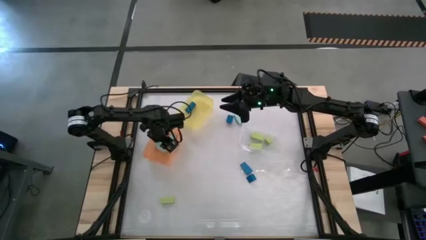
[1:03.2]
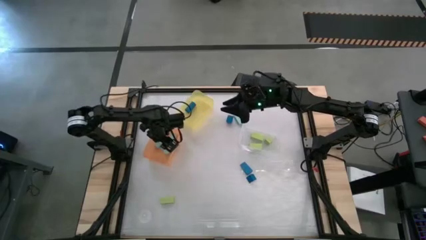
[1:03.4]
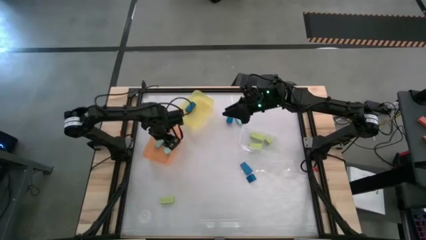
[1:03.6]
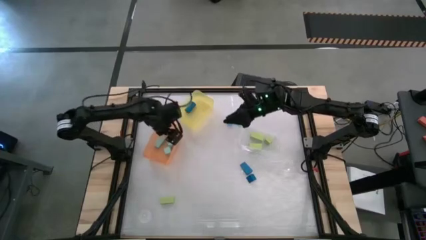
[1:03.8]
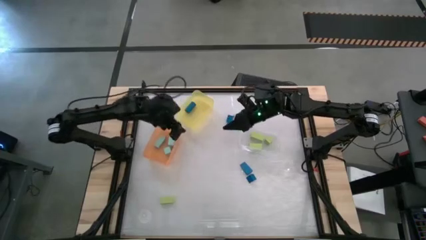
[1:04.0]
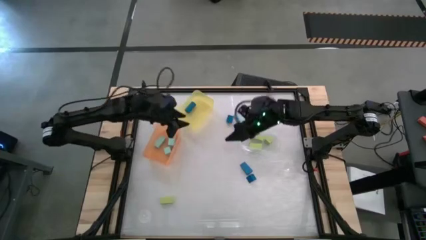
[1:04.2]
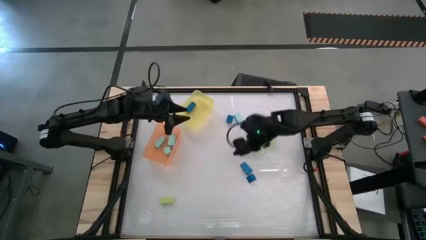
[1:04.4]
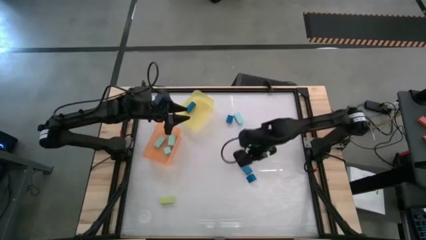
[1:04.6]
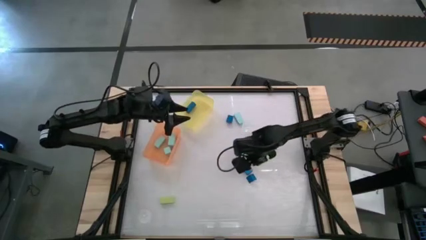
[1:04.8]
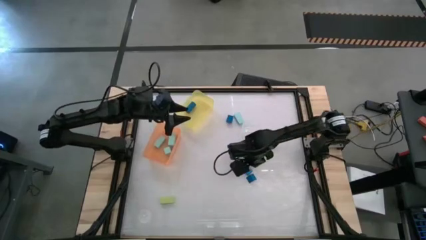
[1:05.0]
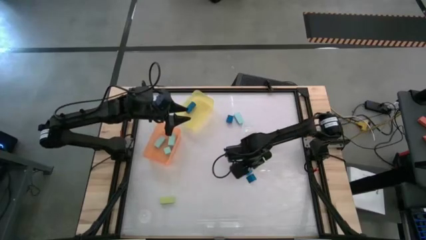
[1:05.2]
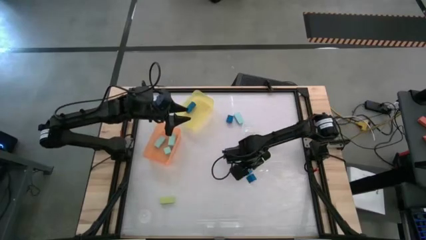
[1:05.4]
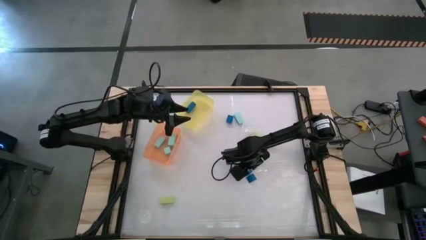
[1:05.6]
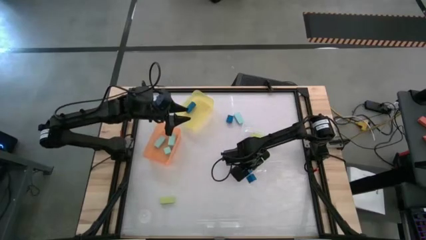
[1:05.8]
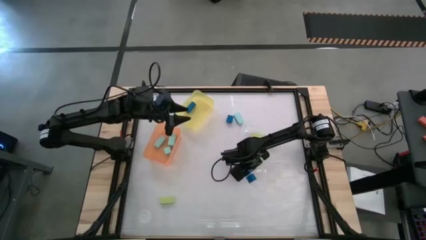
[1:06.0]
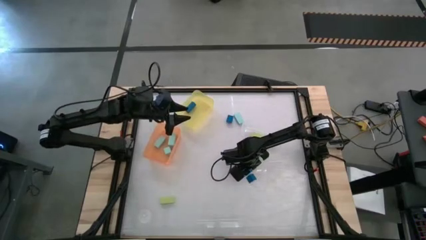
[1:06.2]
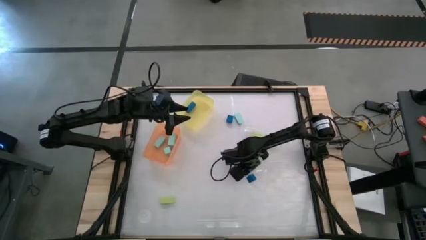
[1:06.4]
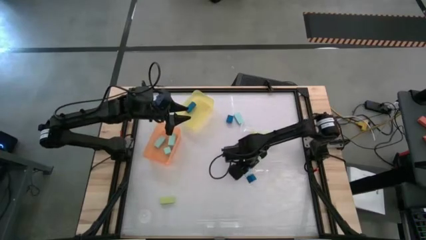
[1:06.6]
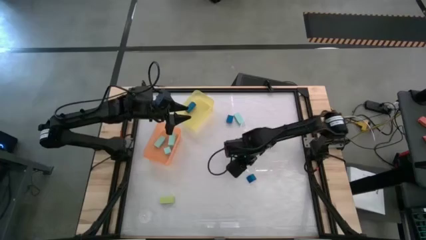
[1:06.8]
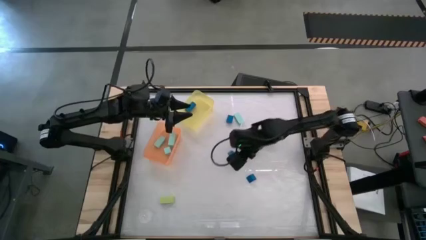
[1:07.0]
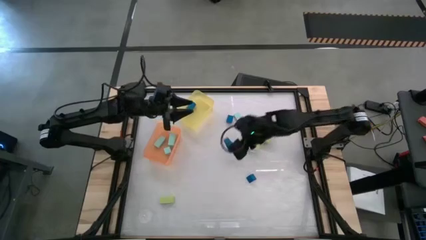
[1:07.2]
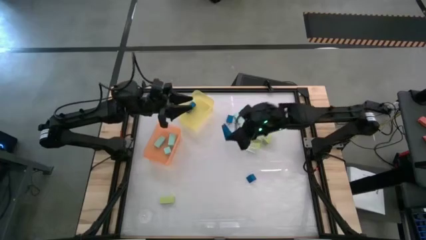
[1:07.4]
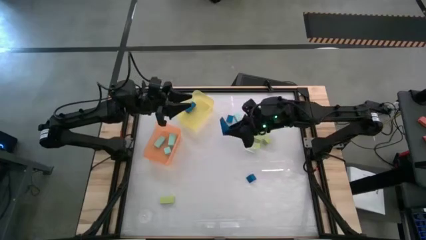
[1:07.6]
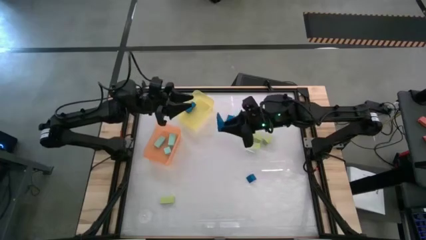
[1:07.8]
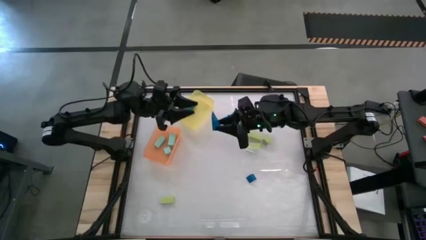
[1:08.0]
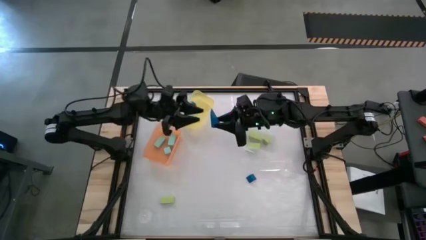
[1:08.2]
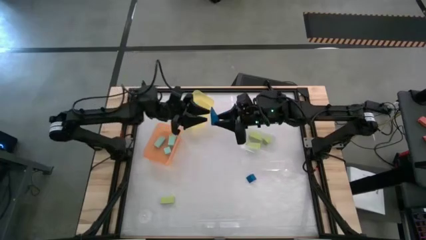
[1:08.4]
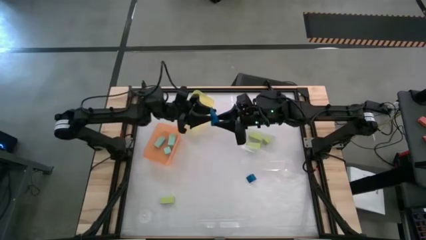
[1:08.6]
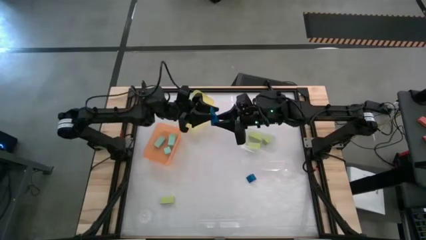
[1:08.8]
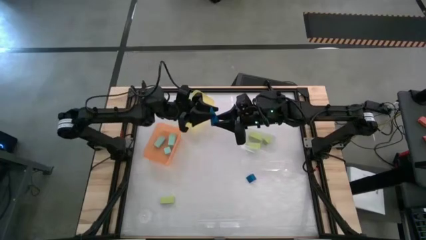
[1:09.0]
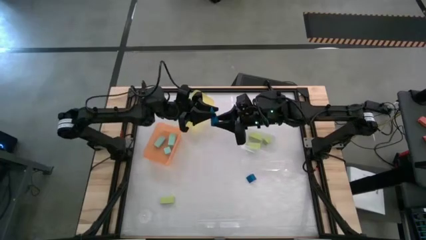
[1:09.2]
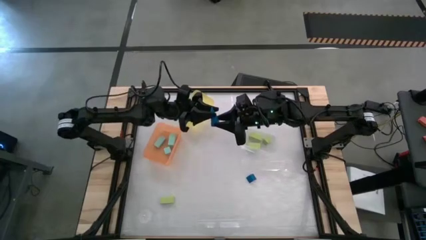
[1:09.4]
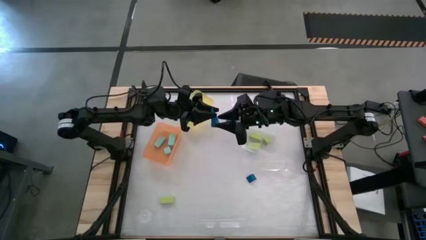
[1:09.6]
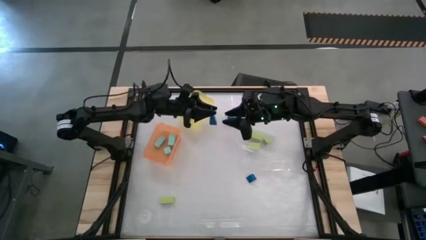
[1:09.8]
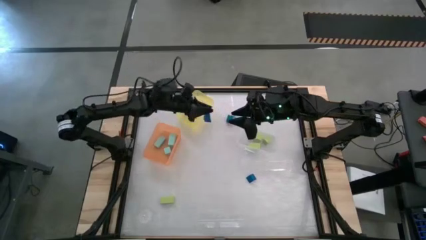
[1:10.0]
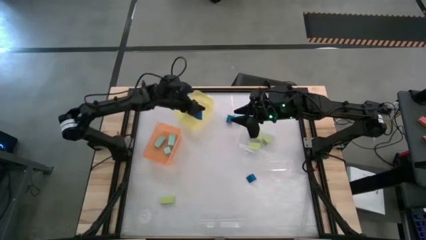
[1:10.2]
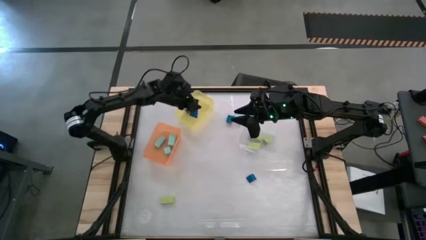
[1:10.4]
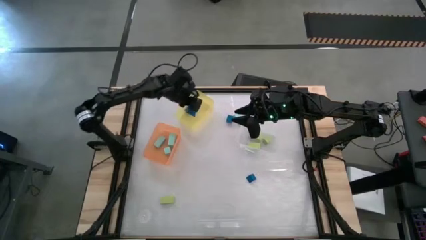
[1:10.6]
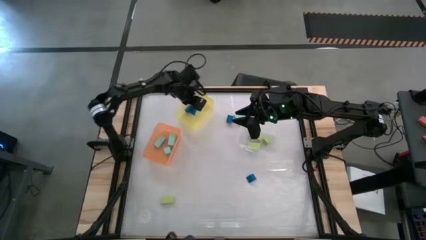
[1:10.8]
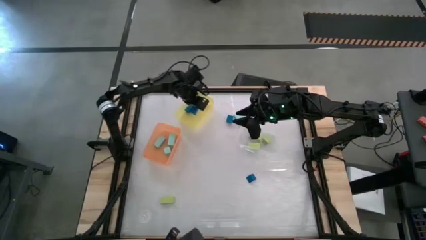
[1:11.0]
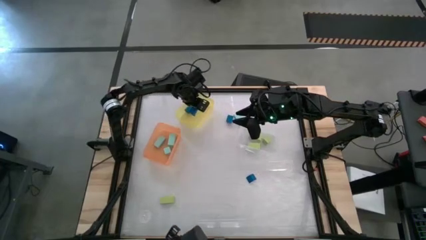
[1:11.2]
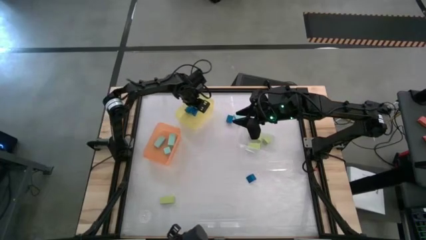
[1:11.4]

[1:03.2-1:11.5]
Task: Sort & place blocks by color
Put the blue block into the yellow bin

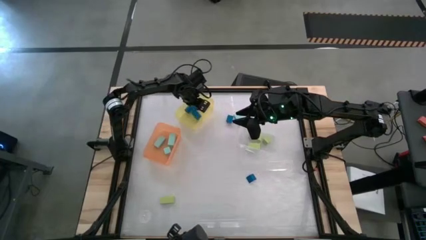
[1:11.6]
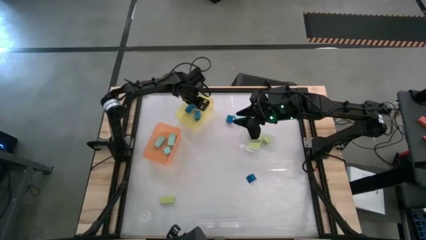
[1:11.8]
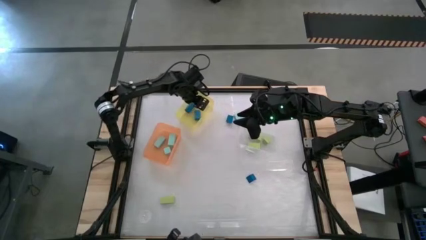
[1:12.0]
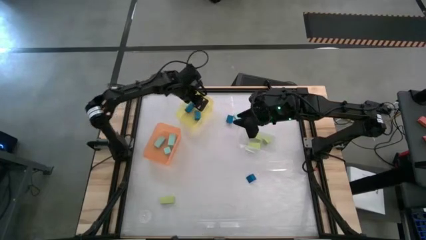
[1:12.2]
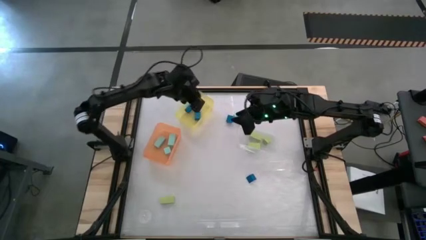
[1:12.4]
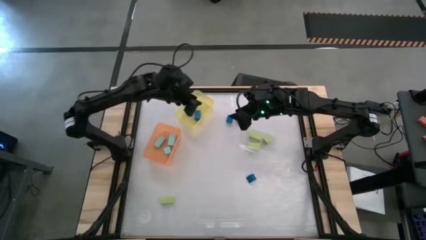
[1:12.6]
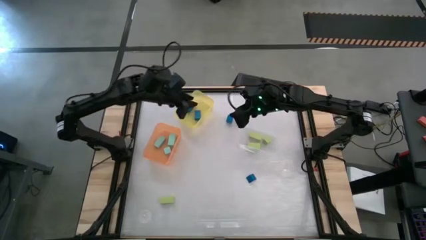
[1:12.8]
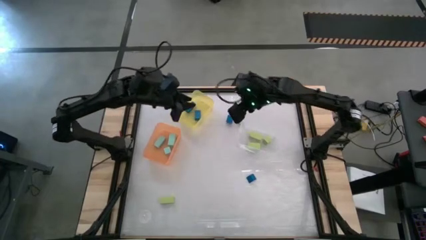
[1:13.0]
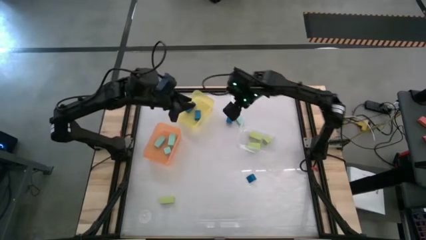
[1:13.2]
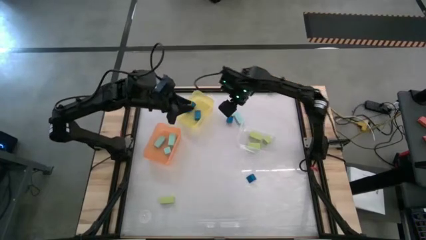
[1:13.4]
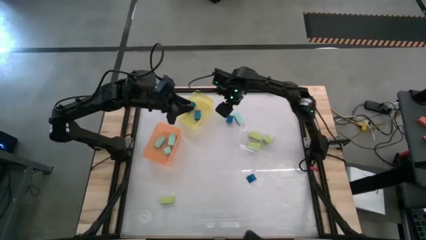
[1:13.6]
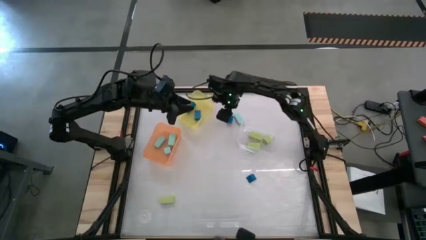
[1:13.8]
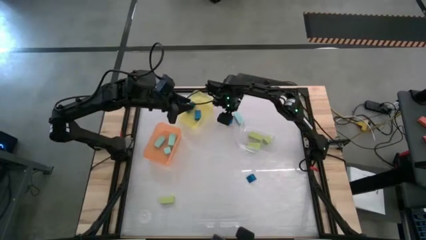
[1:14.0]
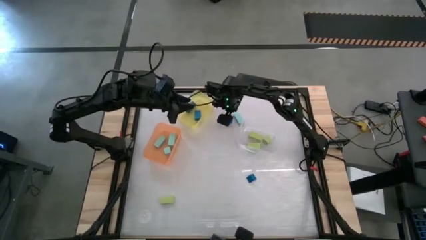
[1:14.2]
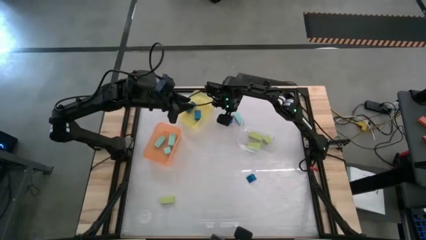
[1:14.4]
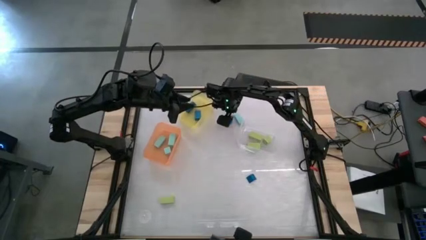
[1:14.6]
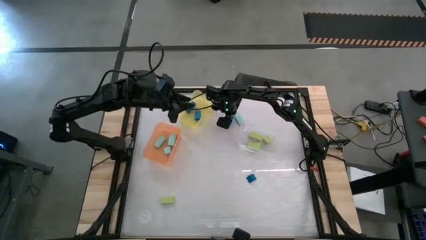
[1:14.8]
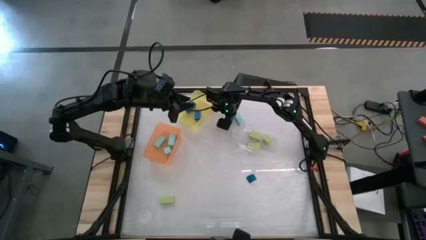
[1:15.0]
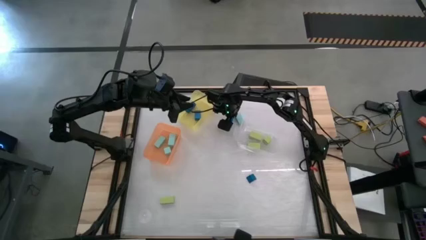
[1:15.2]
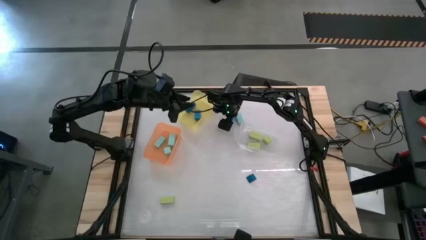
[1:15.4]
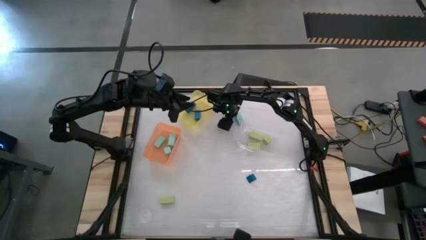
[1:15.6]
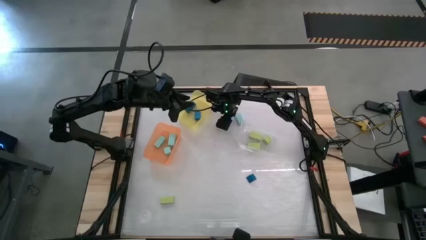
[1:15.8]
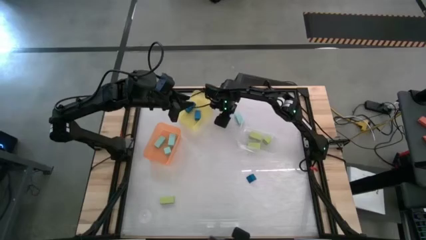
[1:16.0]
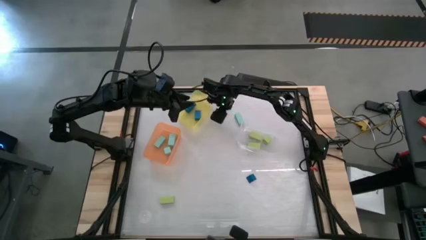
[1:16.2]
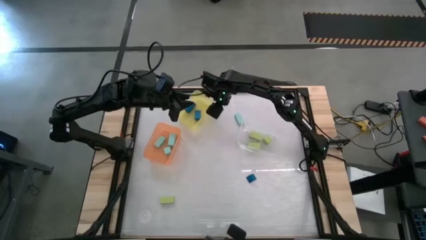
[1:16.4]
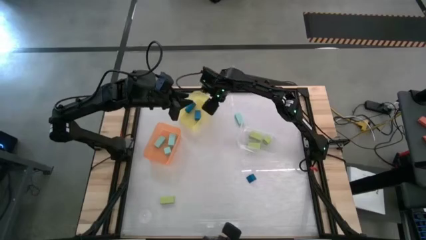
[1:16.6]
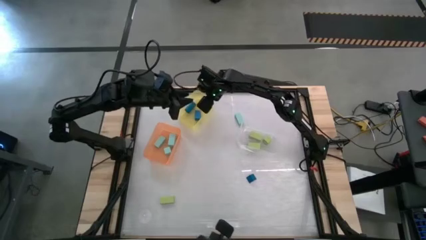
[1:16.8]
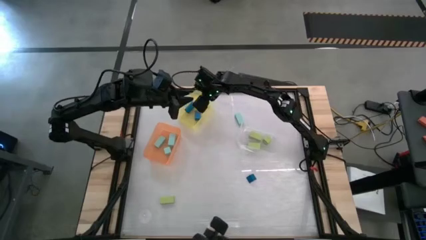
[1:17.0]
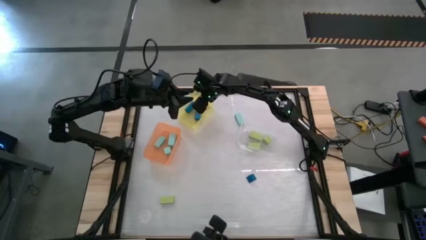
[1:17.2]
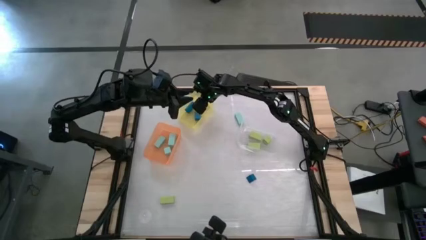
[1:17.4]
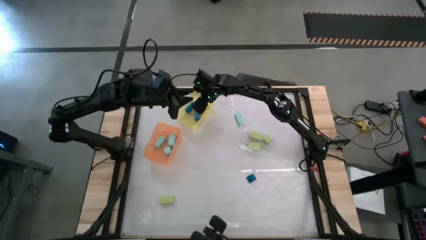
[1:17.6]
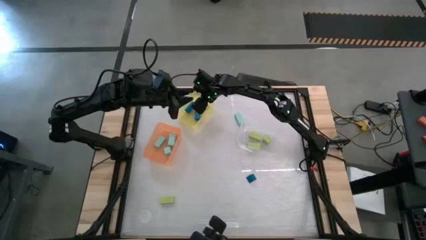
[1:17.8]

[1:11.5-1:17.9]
Put the blue block into the yellow bin
